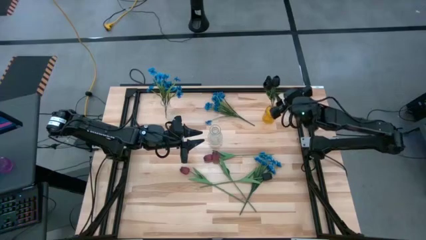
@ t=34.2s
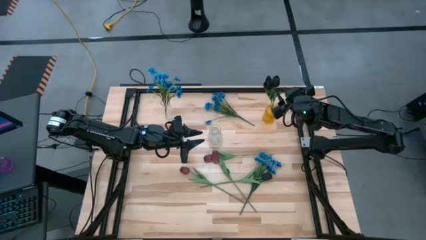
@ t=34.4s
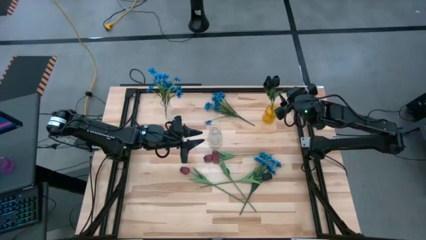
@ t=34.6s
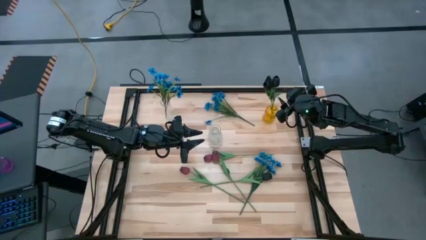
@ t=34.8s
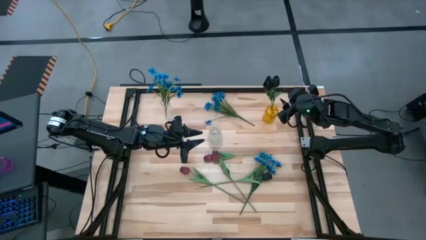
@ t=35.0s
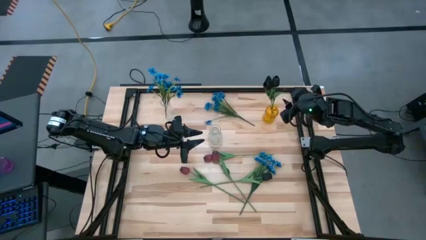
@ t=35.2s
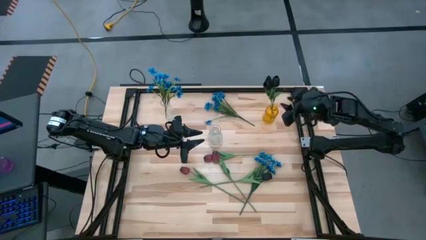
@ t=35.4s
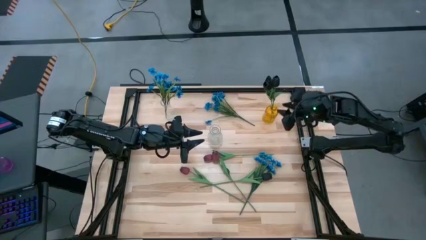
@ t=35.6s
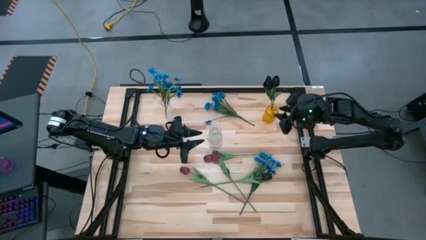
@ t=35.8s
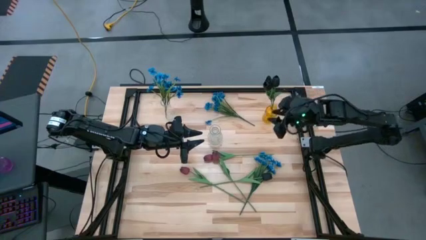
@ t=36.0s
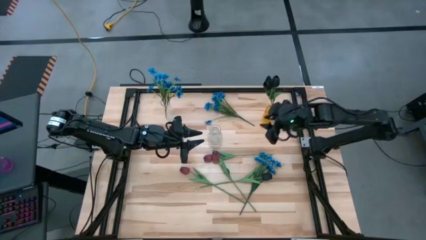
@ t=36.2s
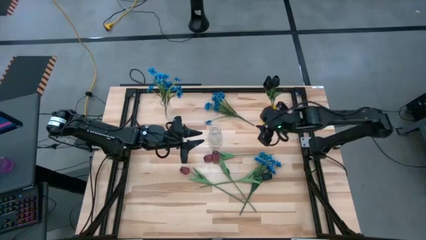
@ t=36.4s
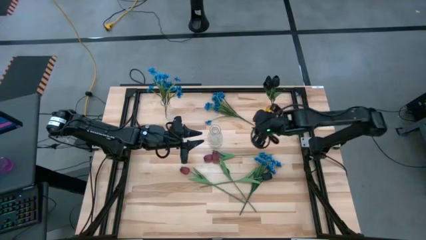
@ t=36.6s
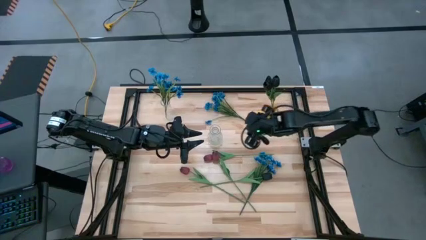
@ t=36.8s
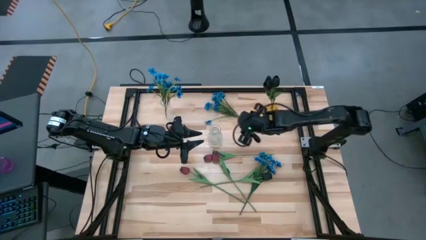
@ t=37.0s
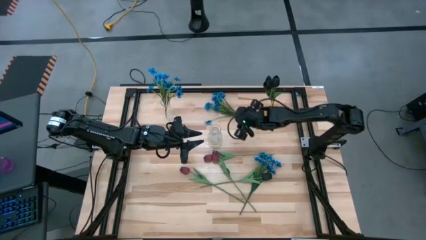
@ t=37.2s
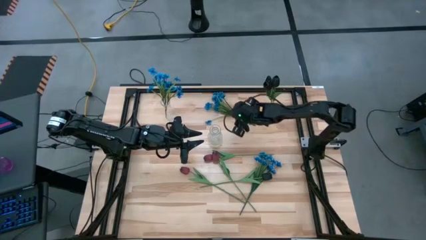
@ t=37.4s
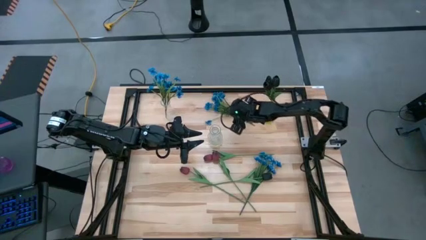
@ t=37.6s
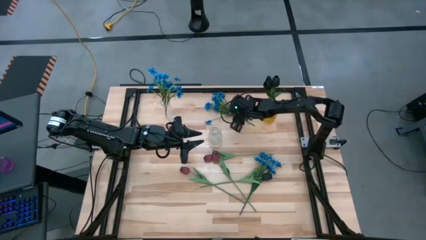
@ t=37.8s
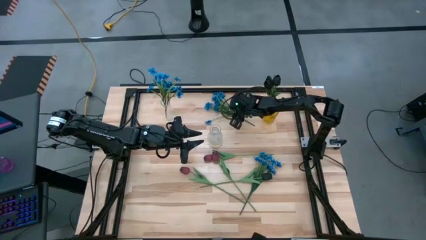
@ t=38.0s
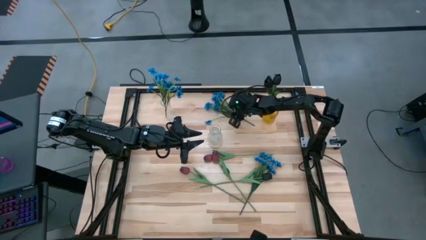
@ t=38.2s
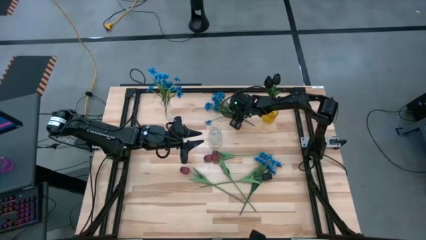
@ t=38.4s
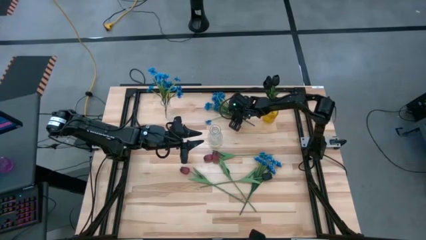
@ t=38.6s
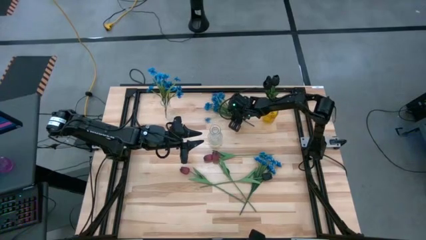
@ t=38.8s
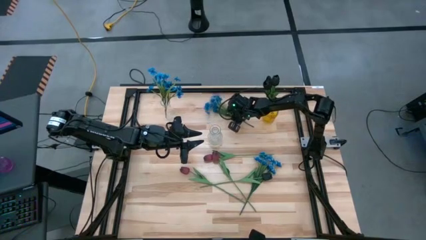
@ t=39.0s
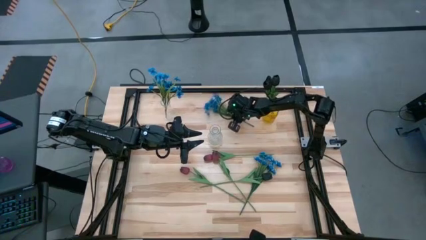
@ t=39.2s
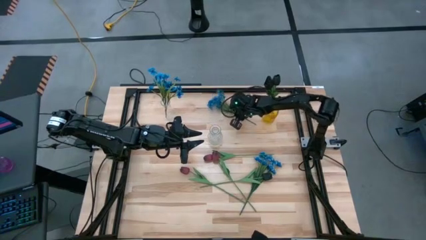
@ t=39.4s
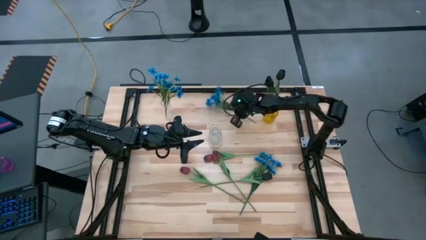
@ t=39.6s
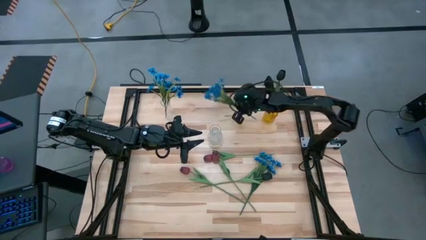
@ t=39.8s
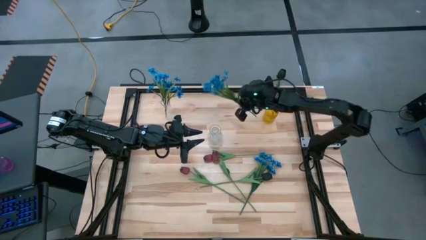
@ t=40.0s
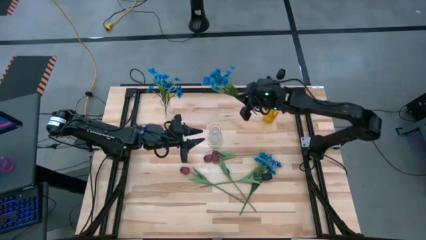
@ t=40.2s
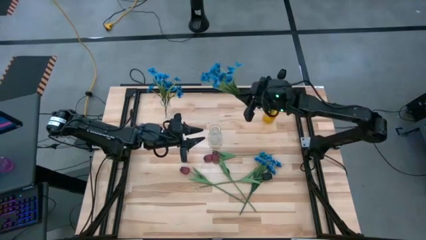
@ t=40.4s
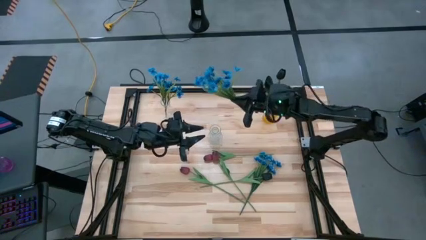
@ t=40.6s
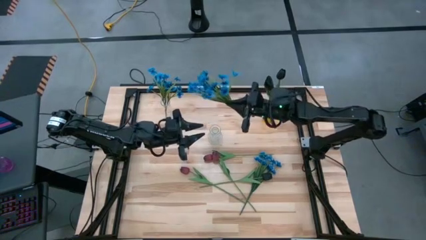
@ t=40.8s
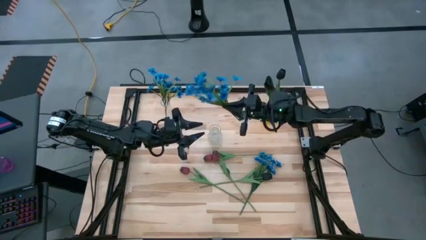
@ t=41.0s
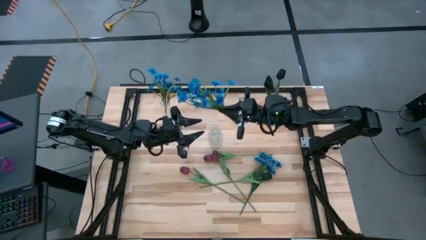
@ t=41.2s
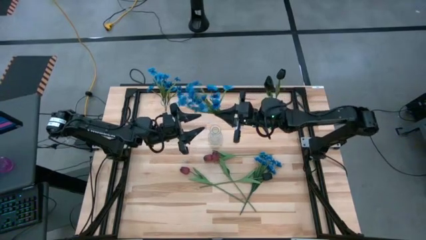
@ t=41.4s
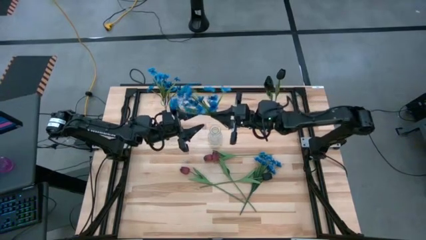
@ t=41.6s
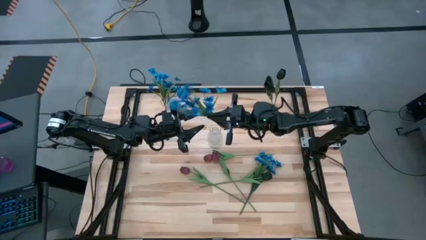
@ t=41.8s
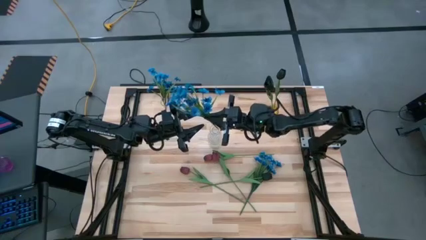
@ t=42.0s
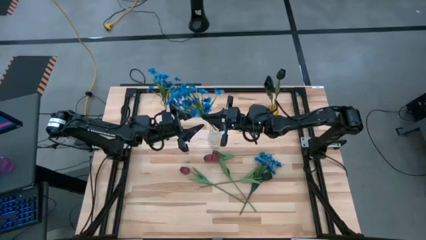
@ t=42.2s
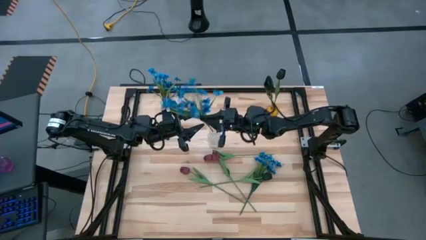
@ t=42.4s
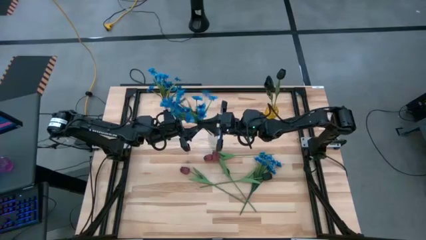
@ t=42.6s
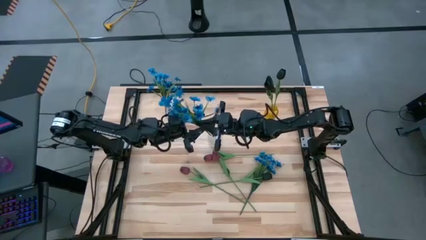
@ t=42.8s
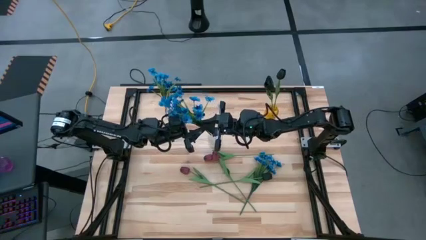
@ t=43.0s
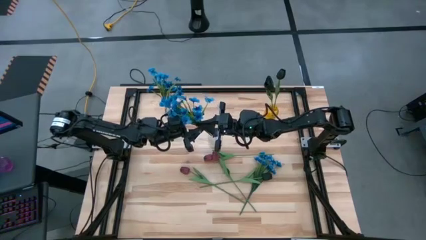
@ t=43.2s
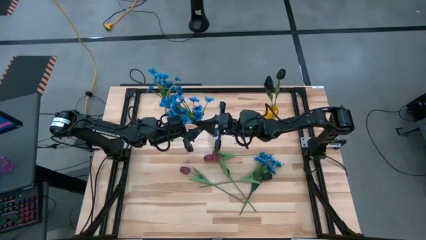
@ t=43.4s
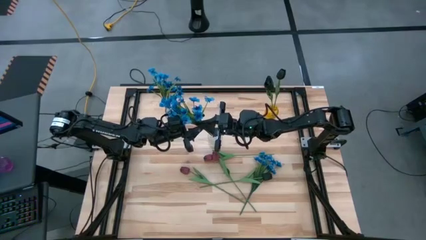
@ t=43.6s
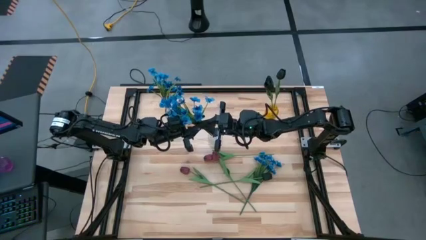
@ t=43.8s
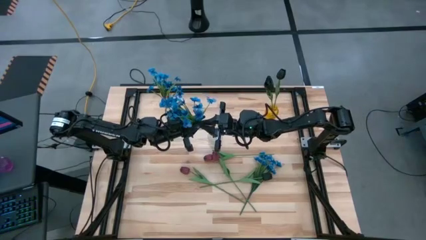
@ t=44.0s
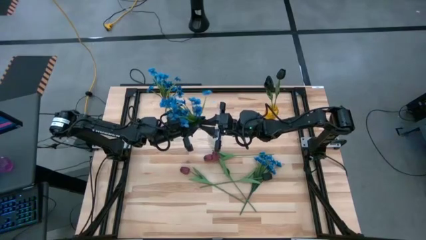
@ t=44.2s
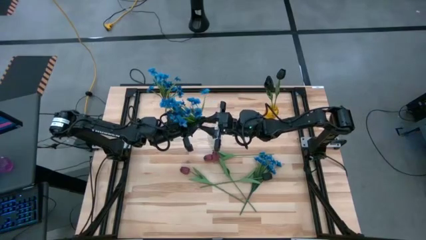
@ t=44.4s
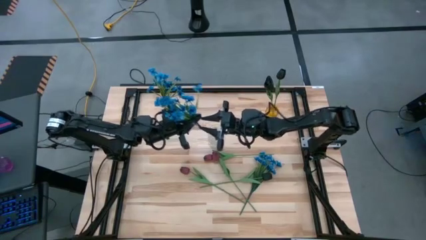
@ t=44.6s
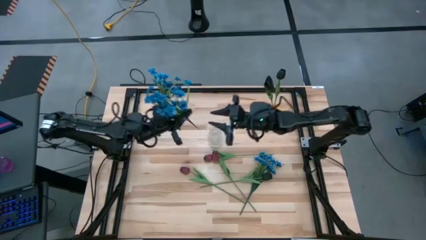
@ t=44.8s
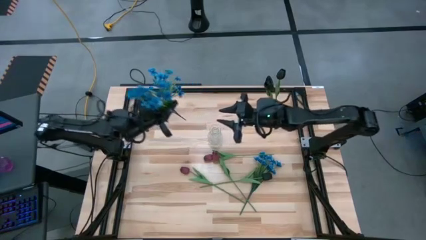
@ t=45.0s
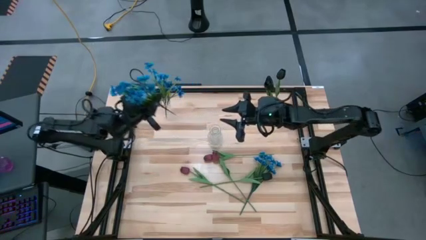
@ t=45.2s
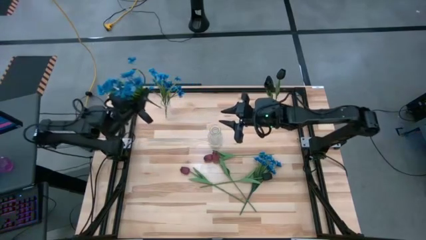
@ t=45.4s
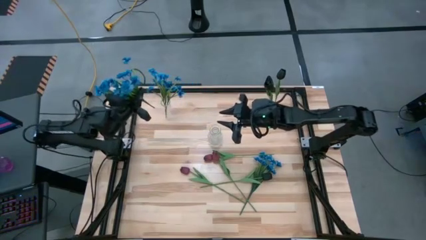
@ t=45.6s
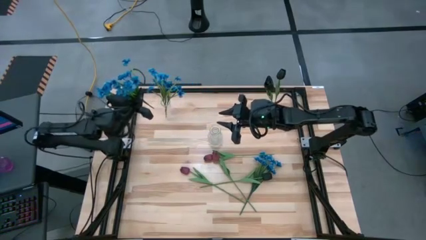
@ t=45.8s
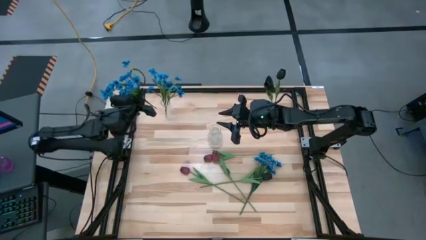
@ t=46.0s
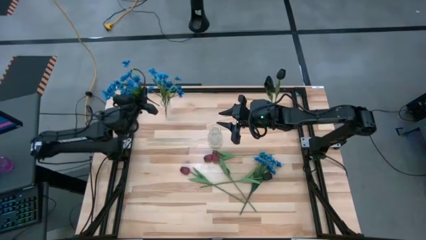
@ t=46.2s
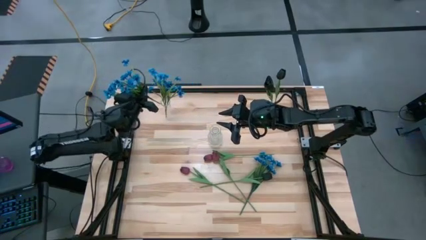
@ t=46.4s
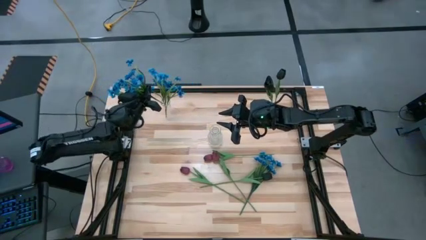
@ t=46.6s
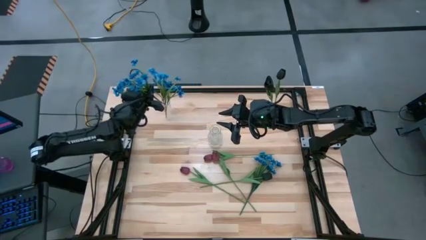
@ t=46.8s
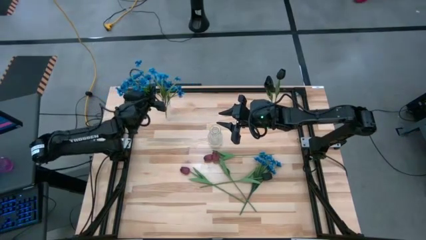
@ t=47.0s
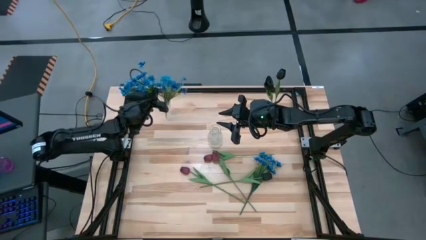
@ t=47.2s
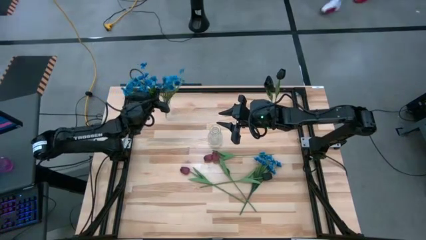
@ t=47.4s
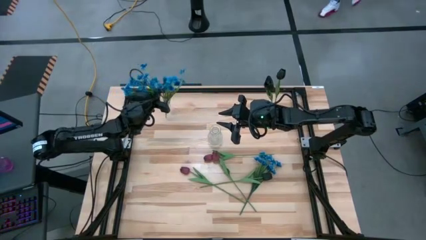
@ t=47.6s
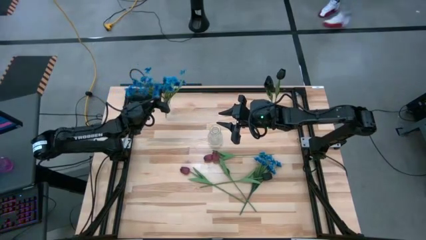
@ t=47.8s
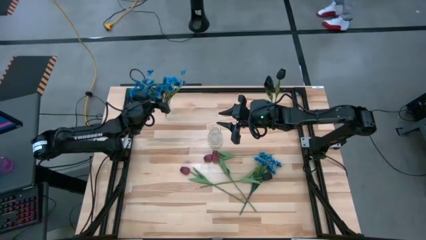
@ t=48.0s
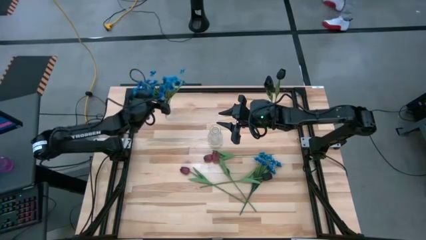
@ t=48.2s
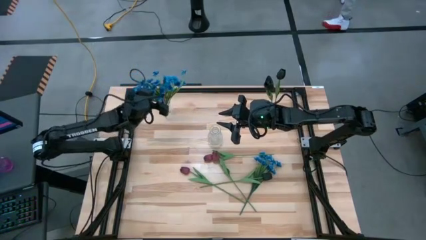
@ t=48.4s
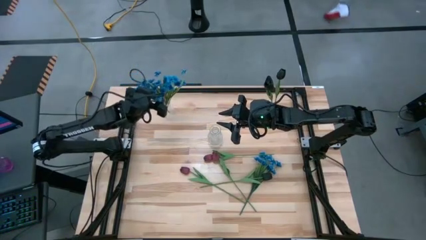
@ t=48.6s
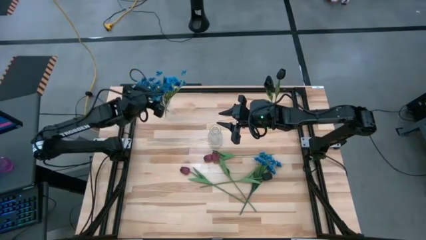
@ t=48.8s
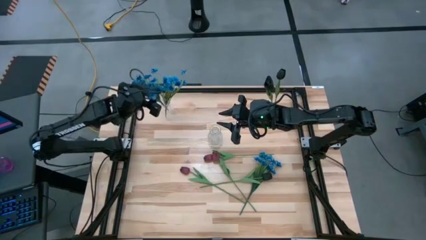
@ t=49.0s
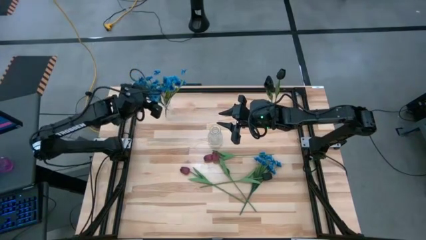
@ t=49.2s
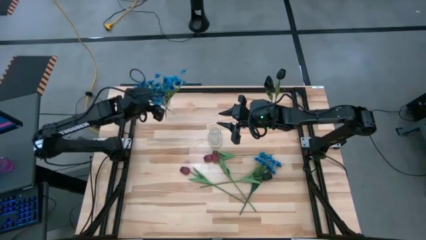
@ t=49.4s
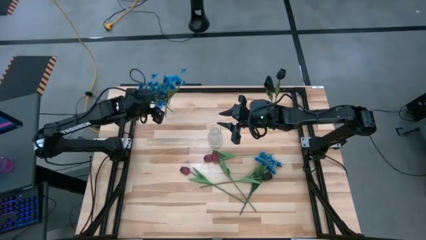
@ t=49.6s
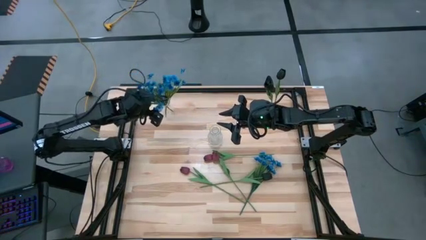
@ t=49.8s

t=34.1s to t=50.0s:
Task: Sort flowers into vase by color
Put the top blue flower into the top transparent vase
